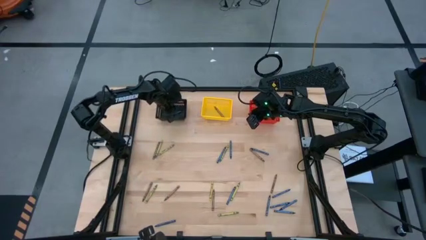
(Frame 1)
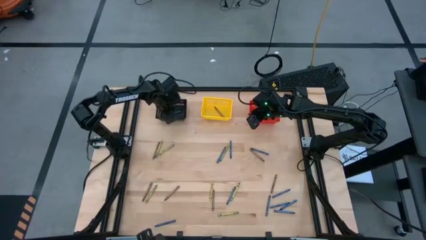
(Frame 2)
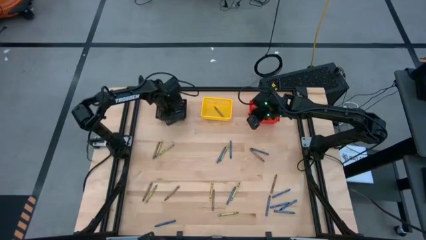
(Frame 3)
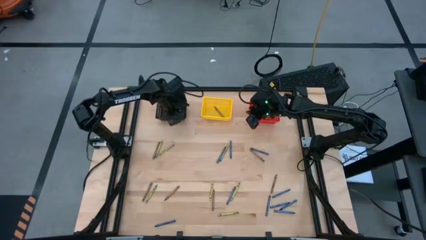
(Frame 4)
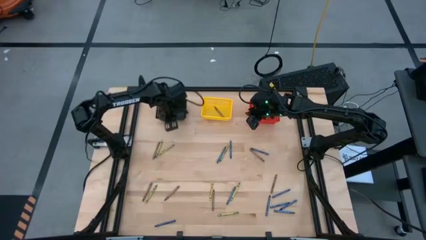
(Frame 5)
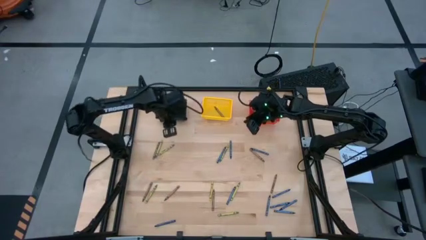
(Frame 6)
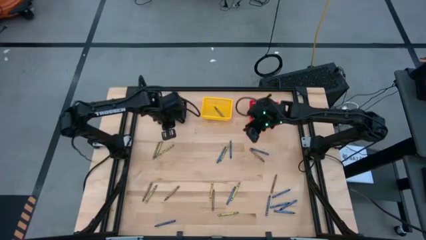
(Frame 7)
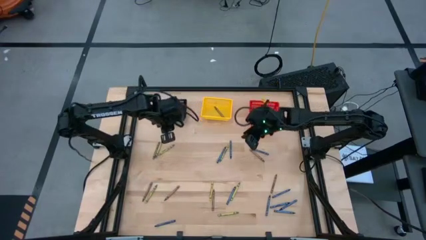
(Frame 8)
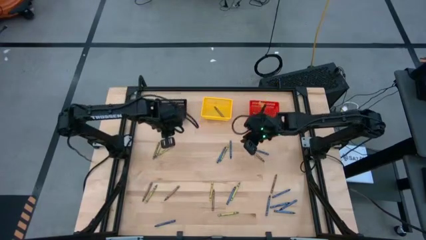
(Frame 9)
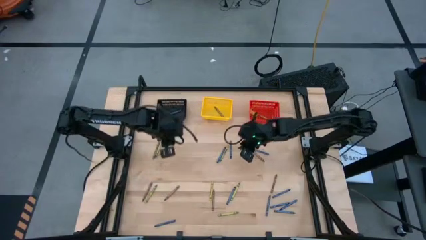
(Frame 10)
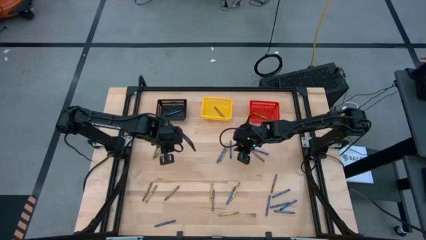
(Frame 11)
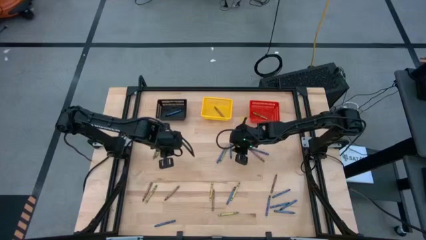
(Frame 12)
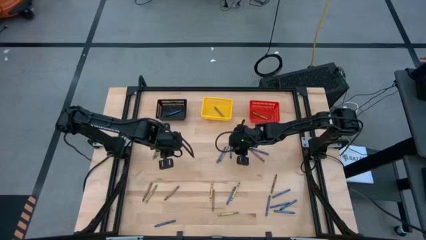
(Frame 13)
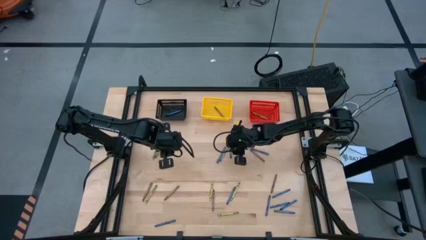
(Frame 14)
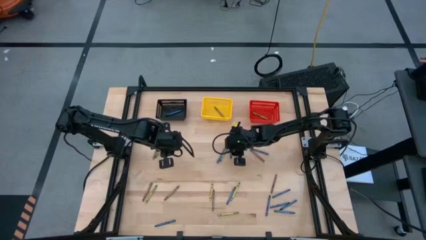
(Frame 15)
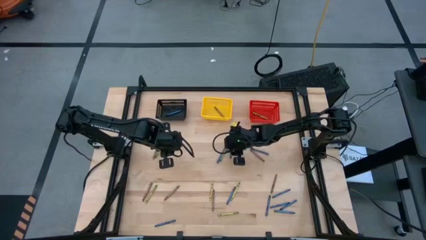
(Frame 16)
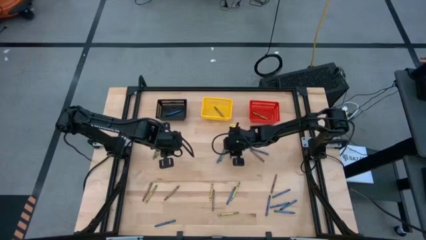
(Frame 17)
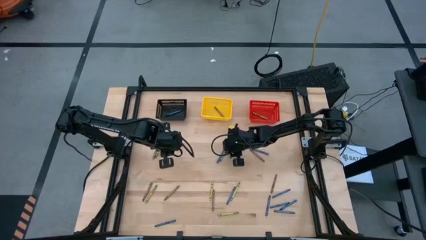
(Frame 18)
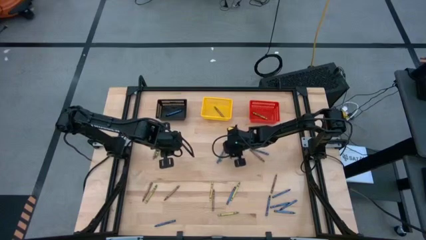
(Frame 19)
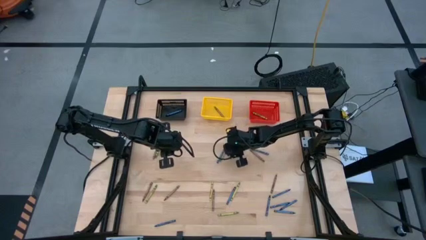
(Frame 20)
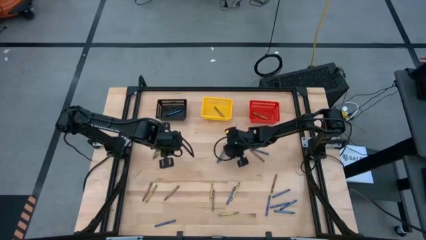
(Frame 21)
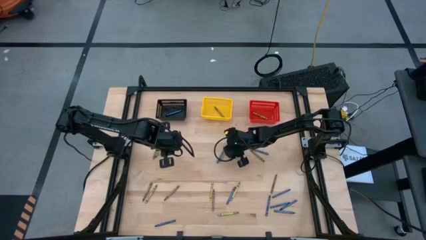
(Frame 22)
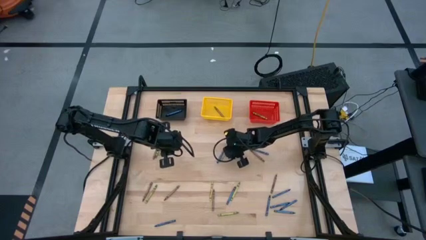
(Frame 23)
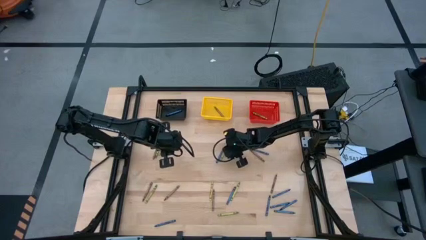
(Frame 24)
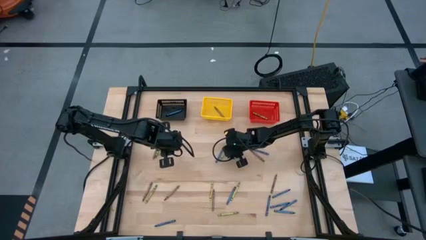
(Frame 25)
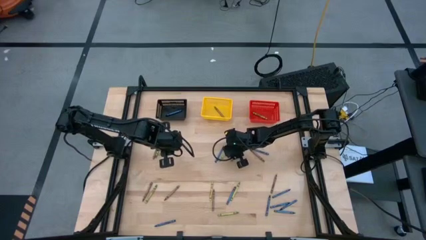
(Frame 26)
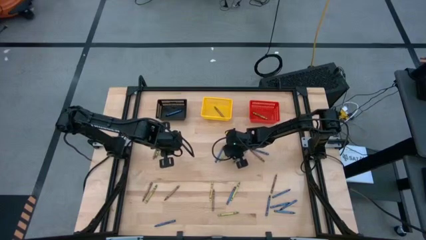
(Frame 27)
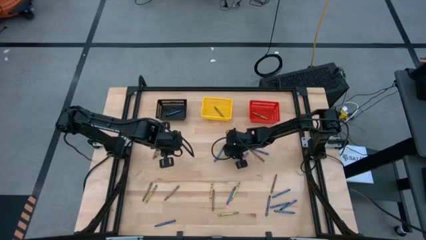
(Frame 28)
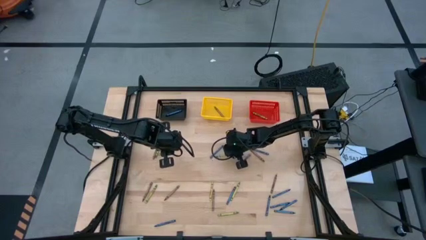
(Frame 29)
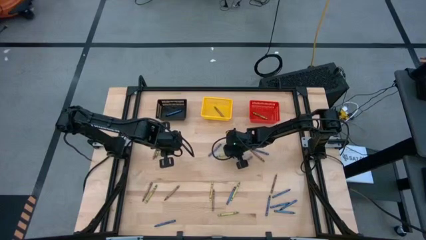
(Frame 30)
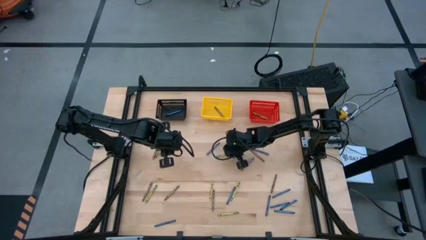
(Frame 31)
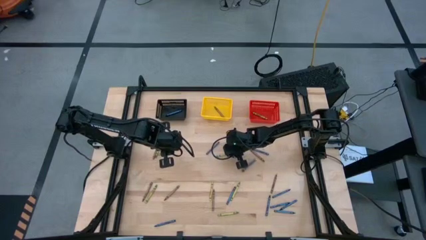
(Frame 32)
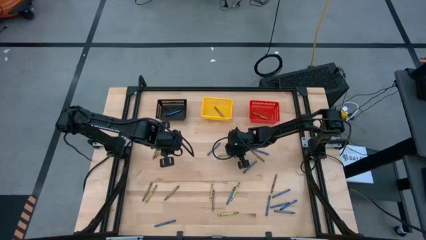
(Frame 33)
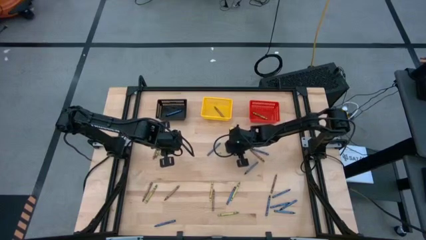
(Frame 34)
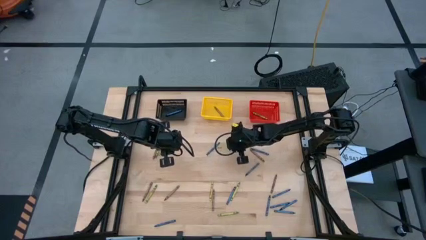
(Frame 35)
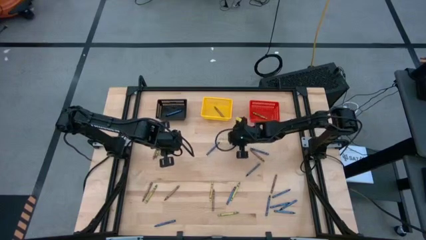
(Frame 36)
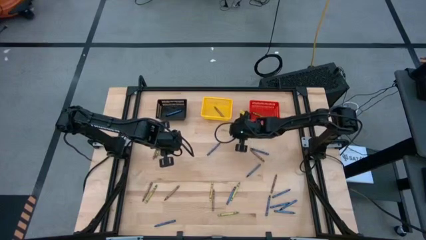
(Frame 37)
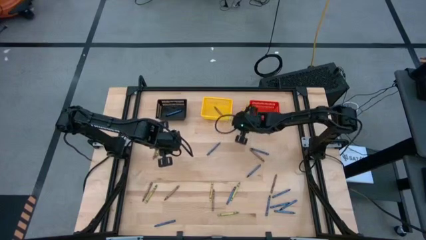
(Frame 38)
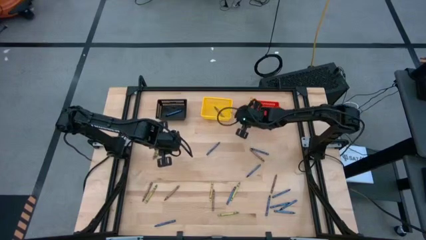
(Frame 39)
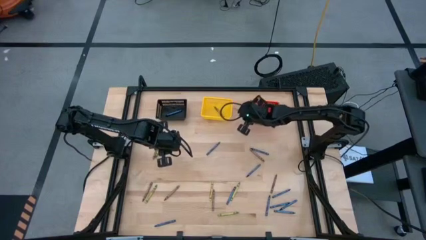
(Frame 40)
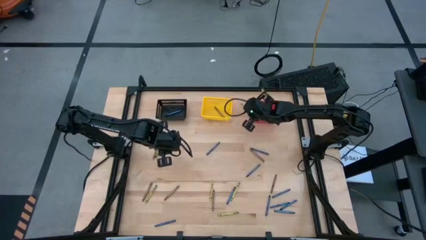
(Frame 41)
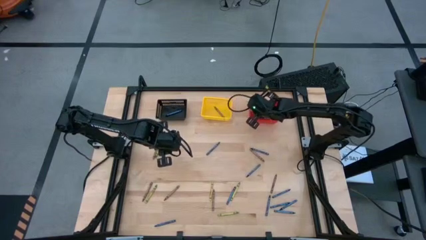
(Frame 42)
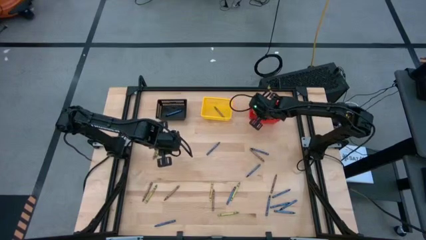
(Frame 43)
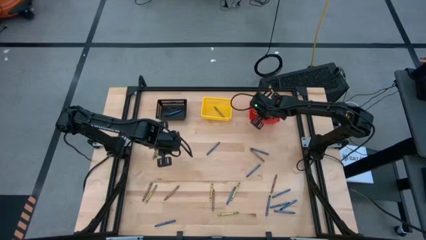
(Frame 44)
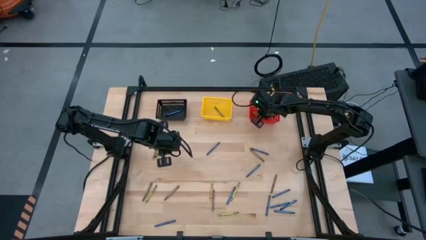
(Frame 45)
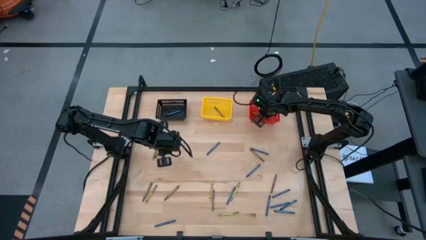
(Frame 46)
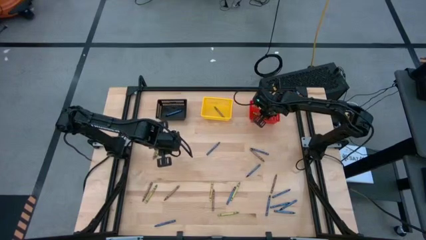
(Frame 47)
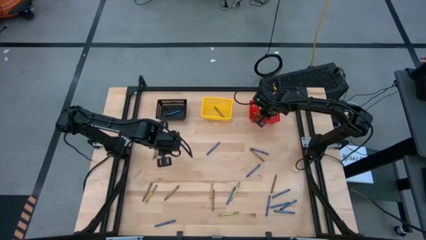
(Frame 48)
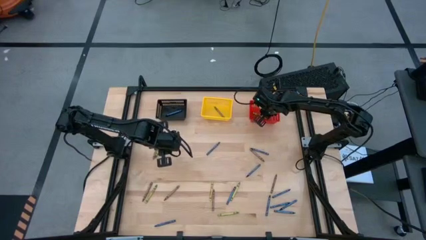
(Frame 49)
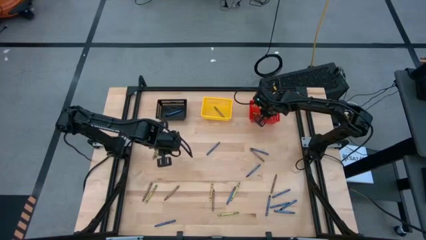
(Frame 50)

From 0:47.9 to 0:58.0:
Task: Sort crayons
Put the green crayon into the red bin

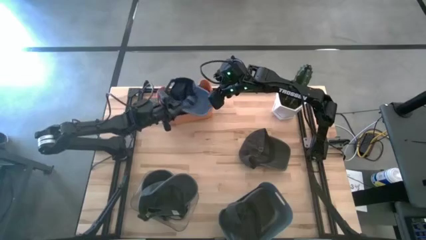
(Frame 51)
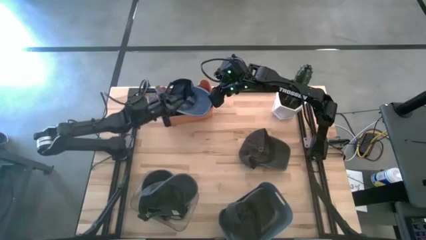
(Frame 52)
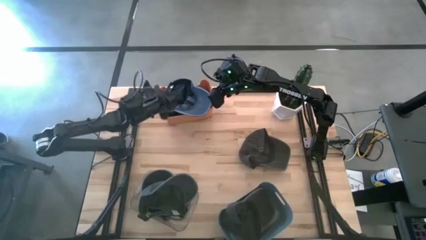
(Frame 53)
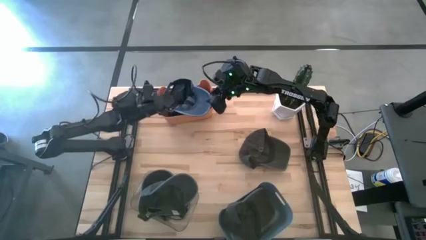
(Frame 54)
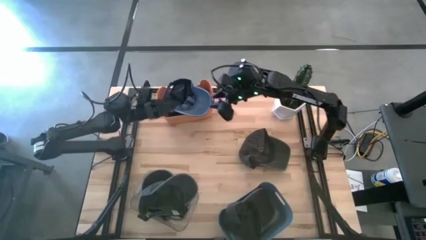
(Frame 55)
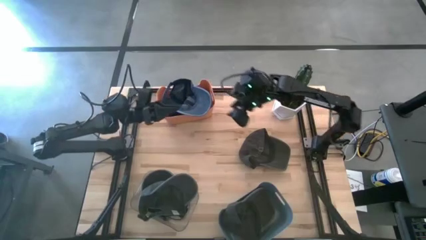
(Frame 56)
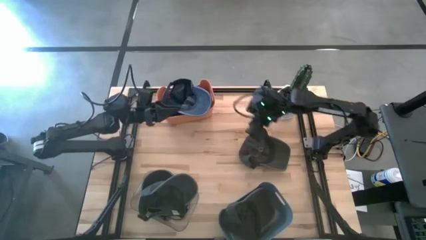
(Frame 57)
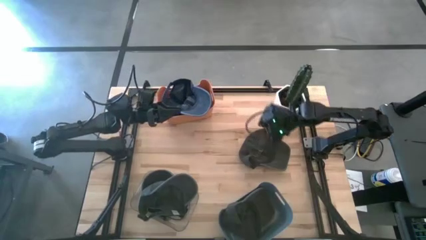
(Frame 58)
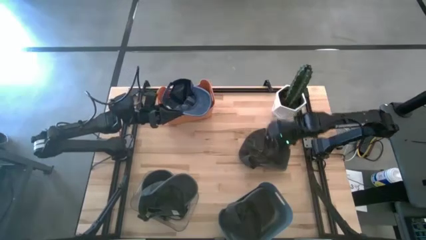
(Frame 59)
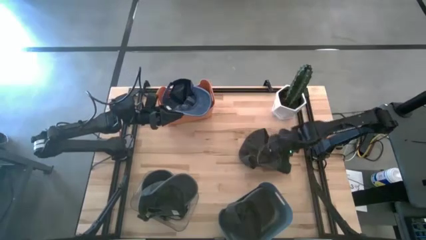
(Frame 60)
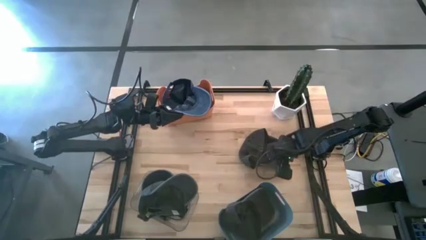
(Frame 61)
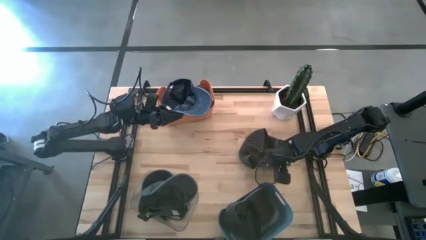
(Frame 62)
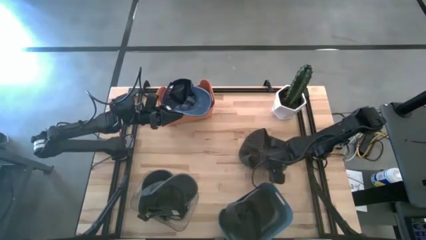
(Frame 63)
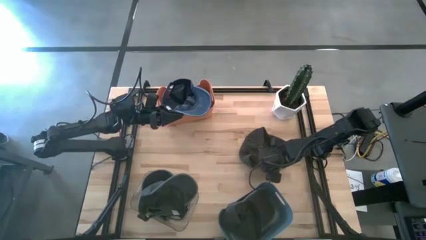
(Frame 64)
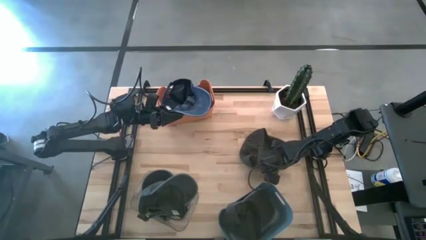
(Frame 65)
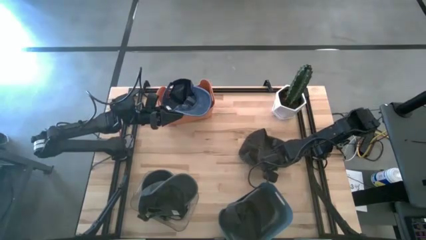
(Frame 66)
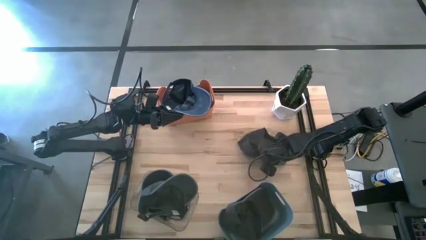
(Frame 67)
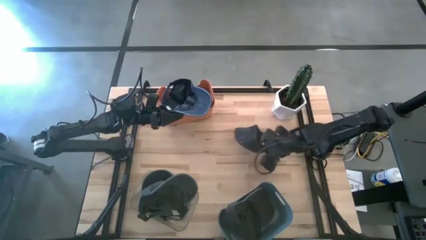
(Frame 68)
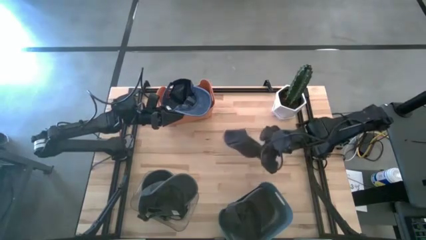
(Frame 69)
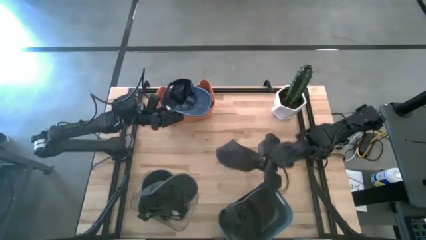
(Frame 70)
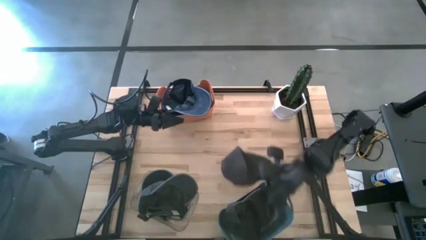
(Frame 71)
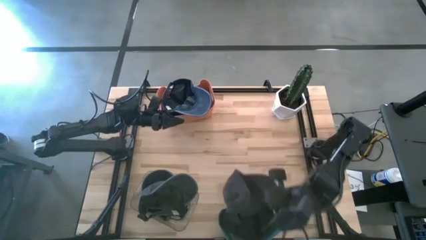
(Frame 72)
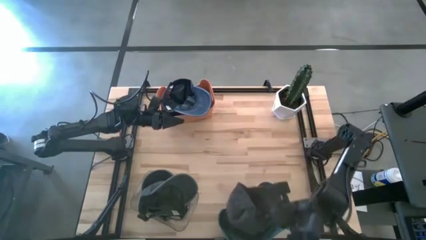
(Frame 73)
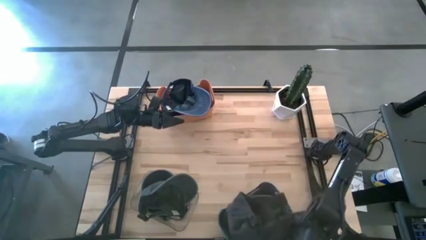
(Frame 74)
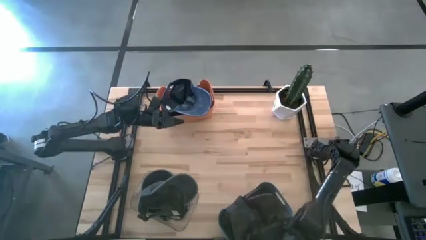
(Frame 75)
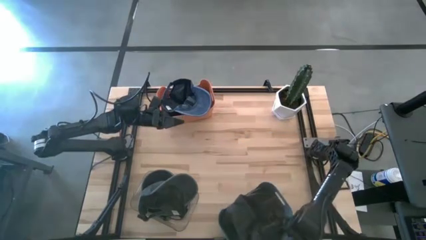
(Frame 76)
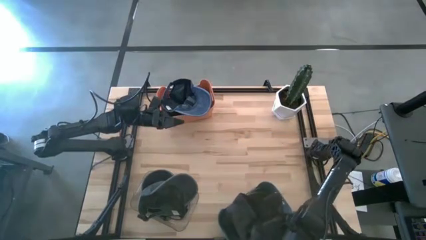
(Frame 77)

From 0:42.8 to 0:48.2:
Task: Pick & Place hat
Put the black cap into the blue bin
